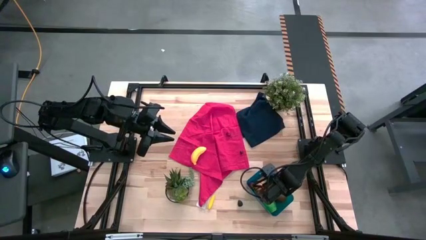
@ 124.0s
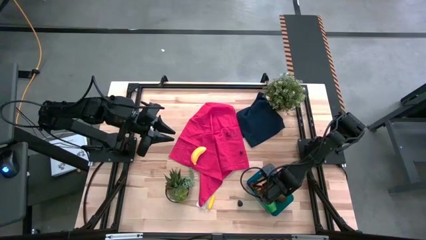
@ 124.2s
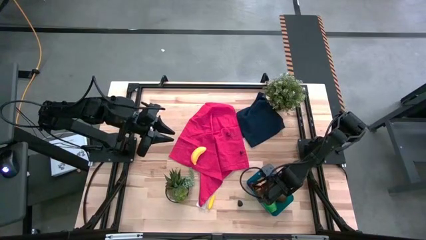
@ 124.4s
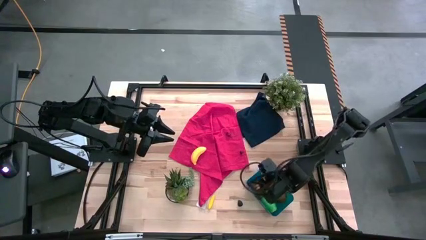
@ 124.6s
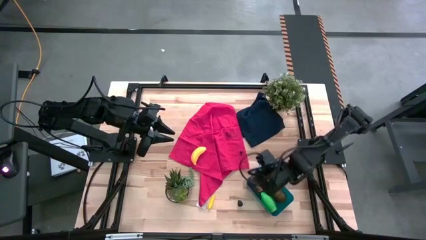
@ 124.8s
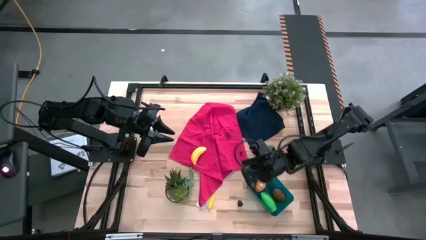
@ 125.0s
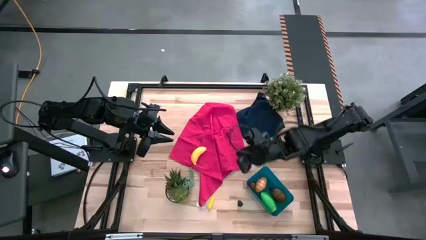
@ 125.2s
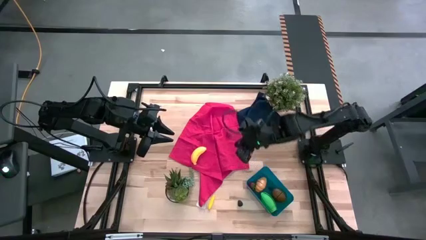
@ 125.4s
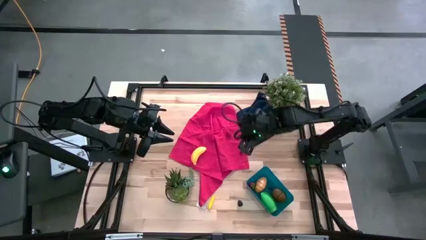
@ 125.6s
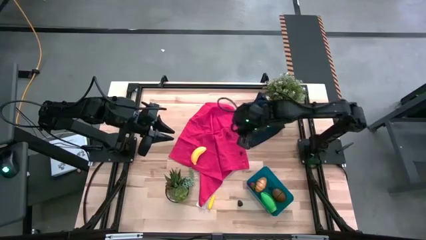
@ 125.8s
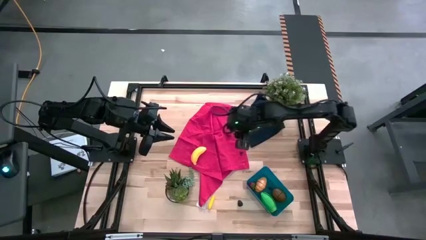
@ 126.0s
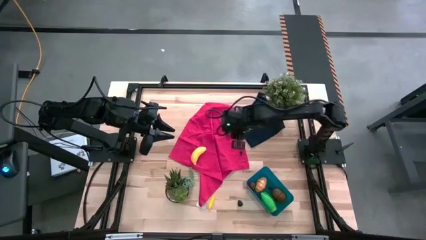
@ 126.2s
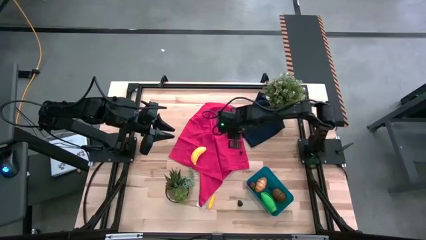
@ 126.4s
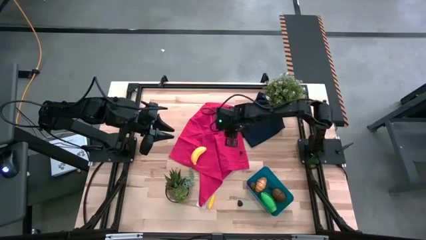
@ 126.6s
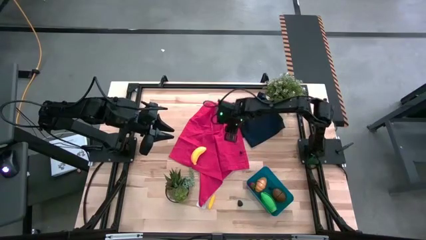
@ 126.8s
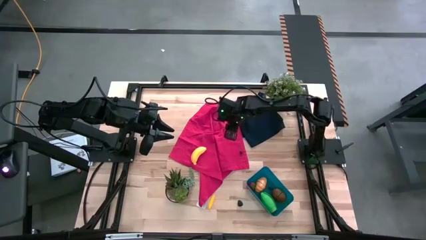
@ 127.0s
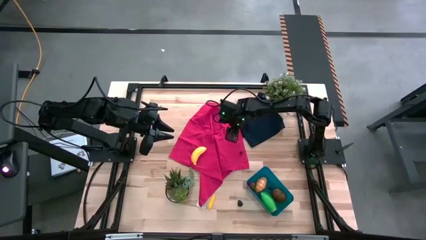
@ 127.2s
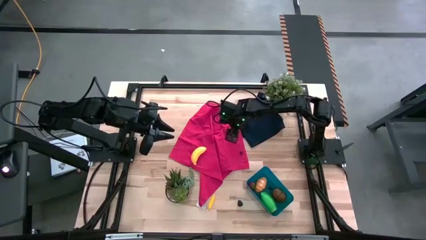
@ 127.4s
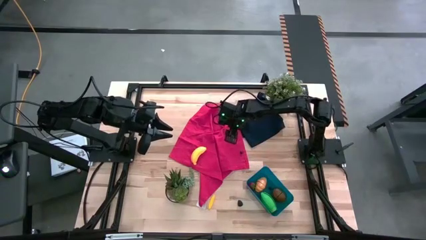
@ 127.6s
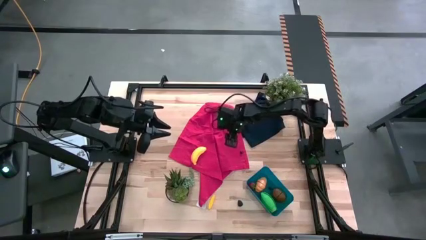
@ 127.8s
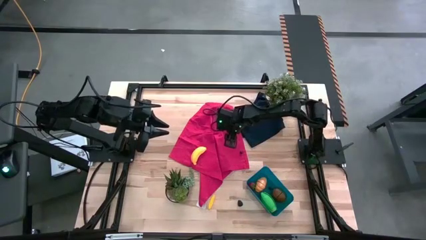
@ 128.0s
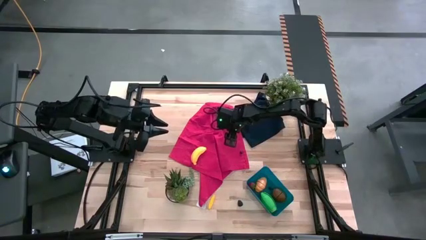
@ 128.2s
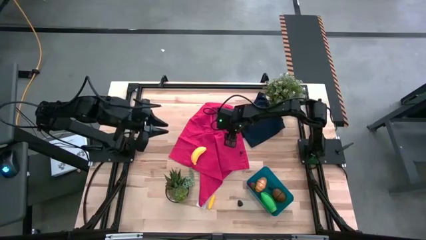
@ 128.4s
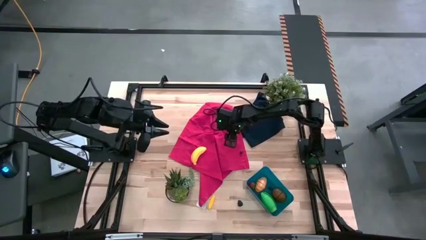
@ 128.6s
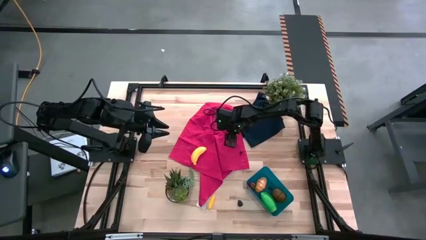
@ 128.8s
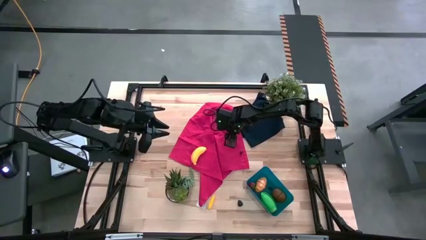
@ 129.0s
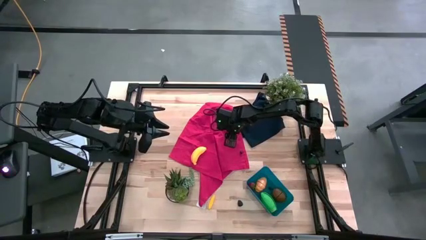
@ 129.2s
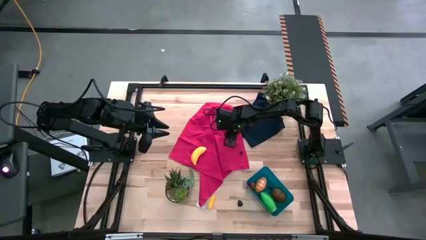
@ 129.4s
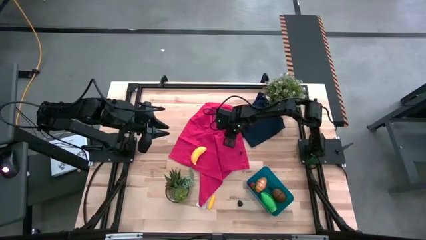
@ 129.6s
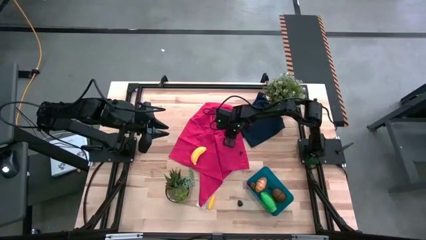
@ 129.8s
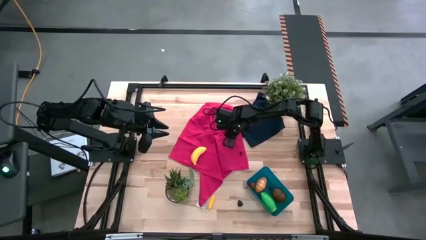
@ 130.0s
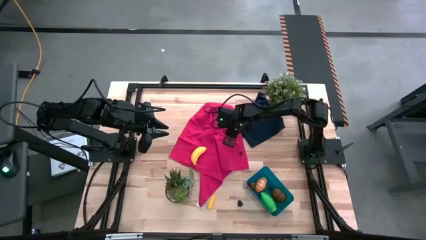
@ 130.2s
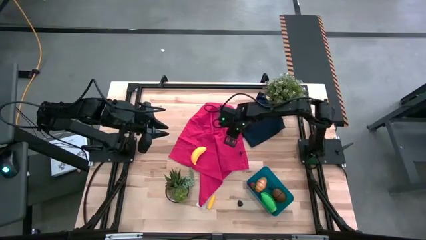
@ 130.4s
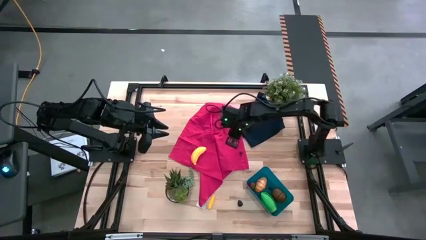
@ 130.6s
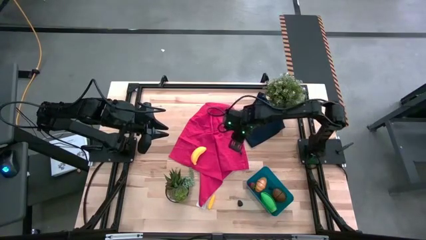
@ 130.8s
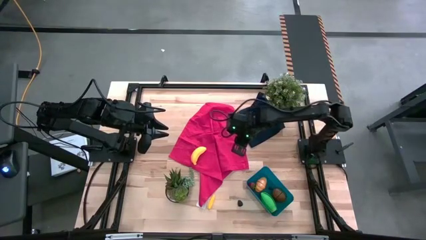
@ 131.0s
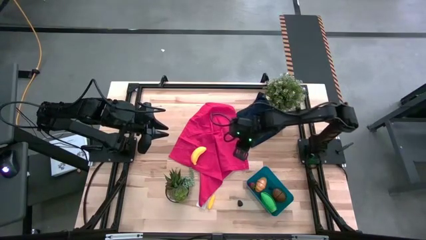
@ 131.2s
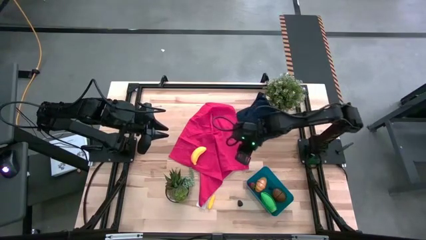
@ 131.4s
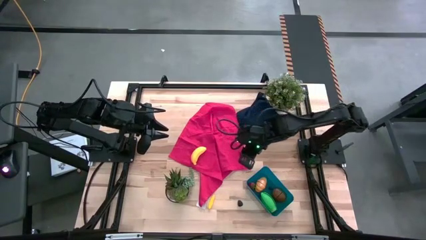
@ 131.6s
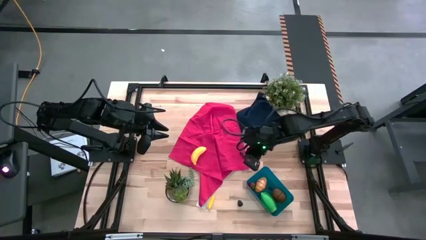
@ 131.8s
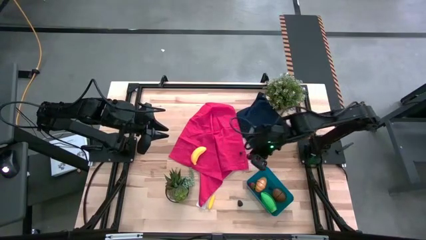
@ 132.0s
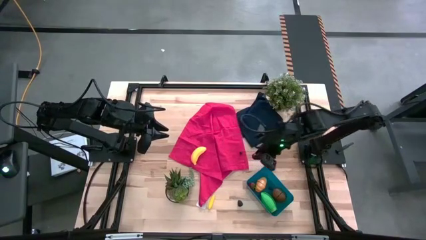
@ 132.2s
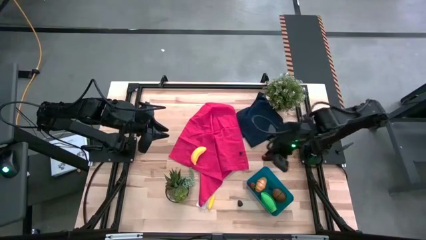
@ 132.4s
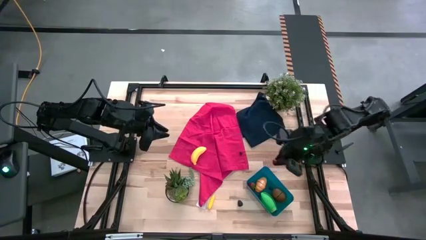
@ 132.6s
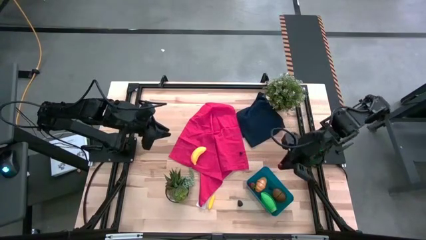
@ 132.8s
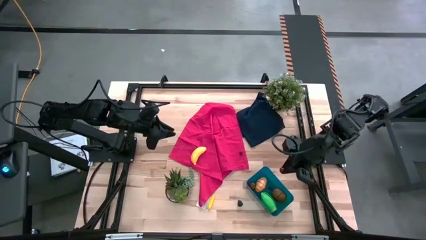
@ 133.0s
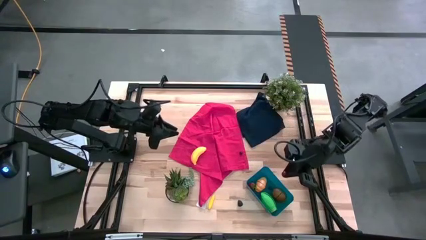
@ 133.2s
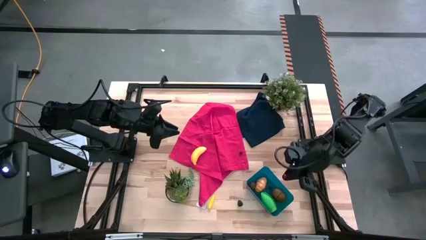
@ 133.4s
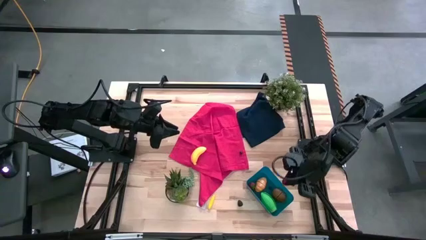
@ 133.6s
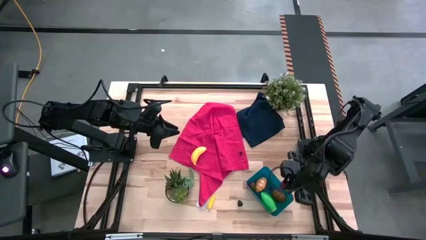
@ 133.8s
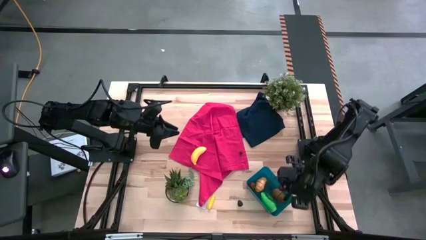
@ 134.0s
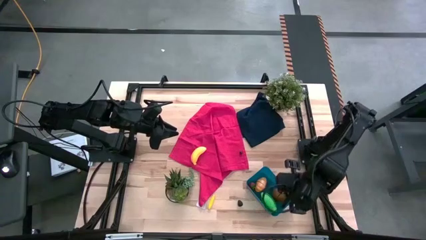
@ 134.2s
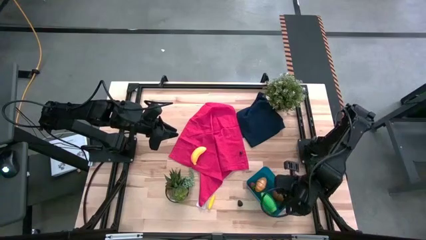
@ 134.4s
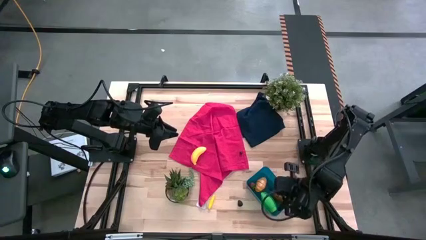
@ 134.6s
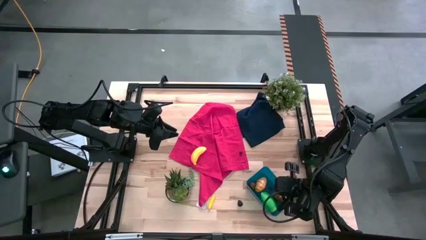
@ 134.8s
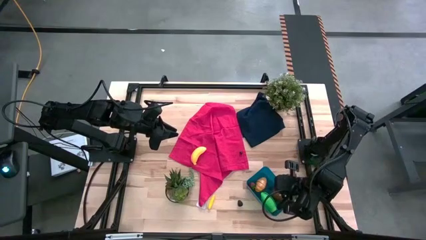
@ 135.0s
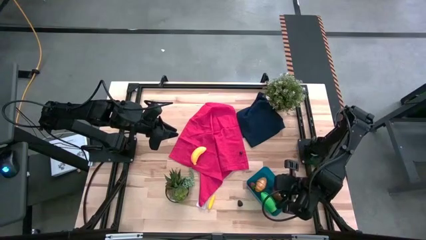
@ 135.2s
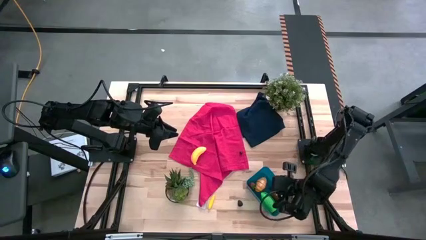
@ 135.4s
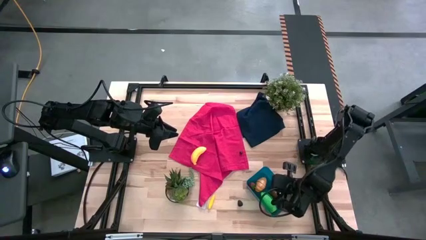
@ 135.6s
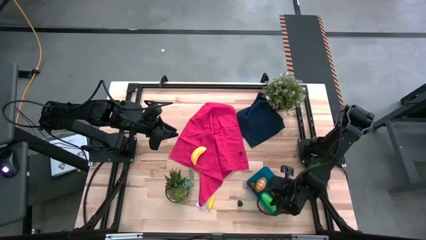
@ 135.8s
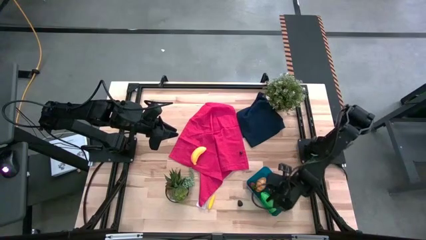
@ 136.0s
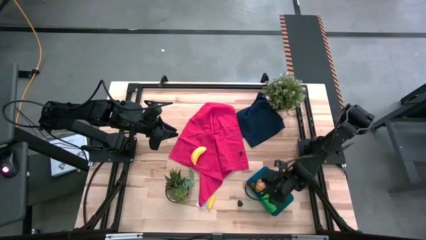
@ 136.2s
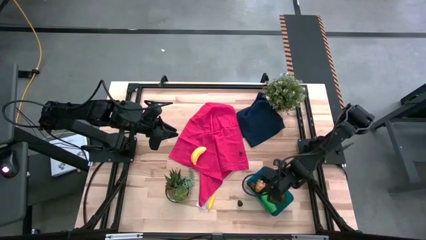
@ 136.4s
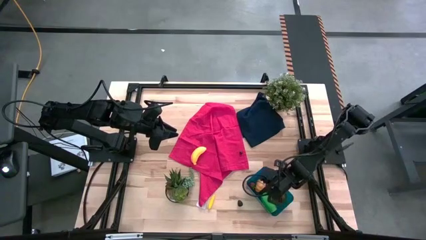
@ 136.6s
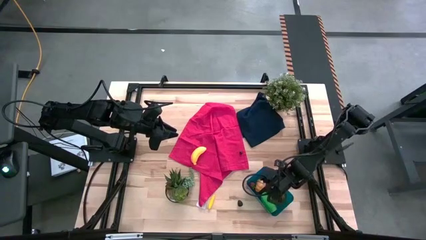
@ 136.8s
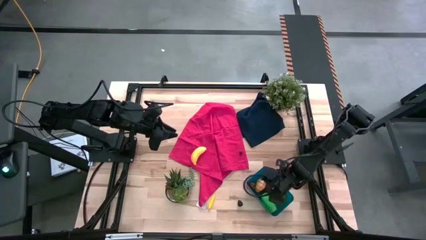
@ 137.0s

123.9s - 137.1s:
Task: Pick and placing Produce into tupperware
Put the red cherry into the blue bin
